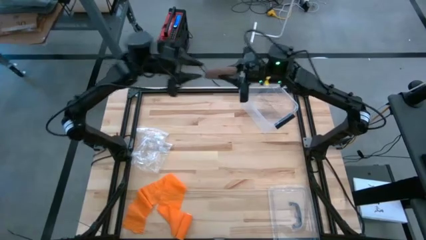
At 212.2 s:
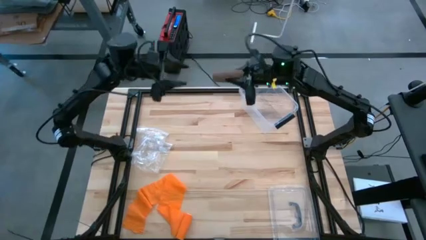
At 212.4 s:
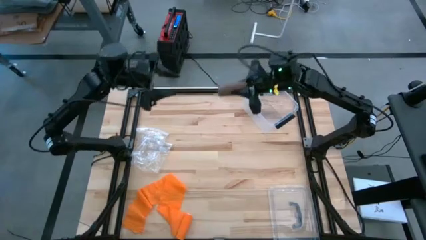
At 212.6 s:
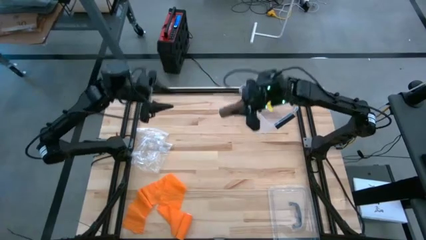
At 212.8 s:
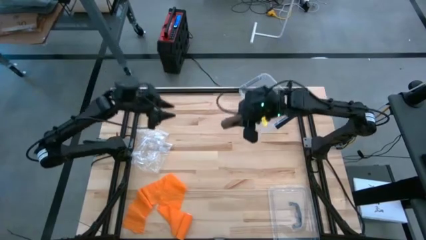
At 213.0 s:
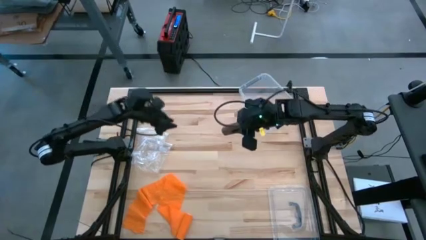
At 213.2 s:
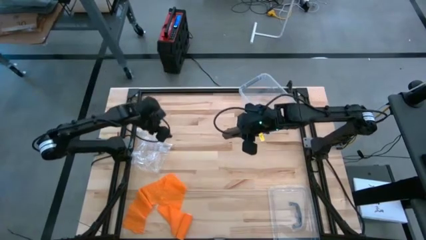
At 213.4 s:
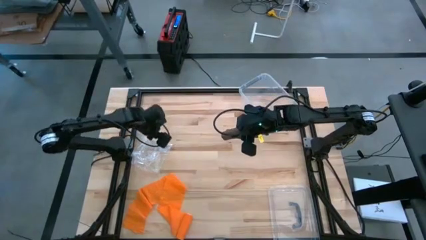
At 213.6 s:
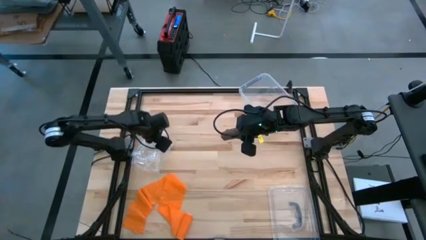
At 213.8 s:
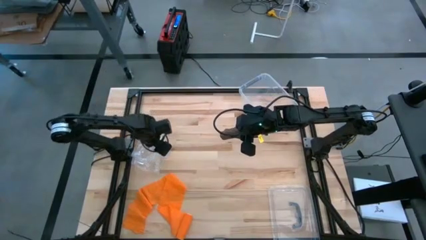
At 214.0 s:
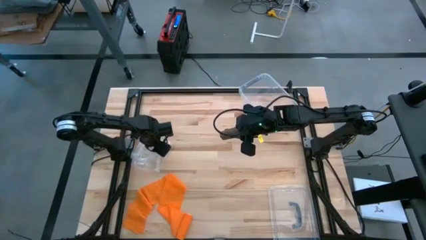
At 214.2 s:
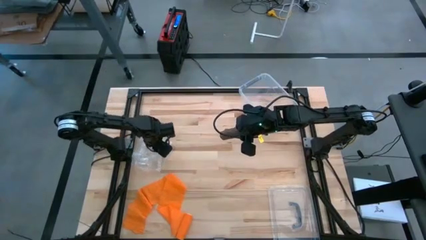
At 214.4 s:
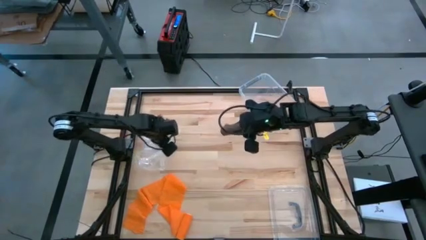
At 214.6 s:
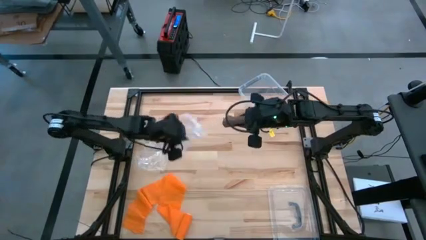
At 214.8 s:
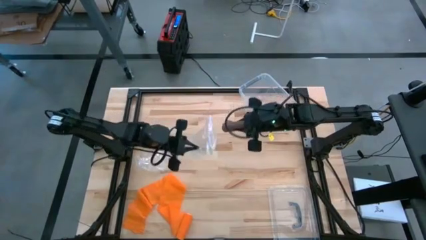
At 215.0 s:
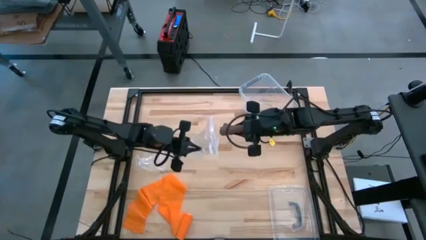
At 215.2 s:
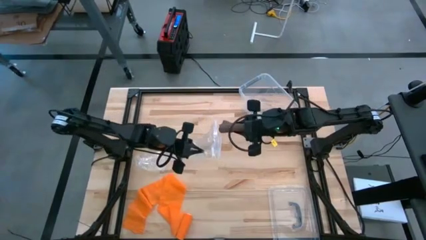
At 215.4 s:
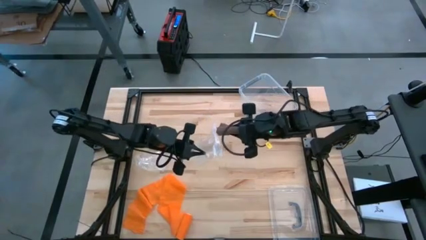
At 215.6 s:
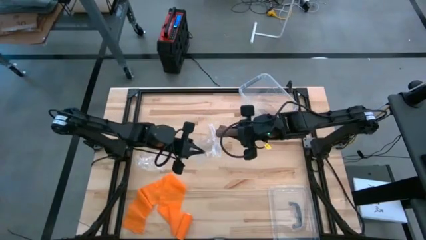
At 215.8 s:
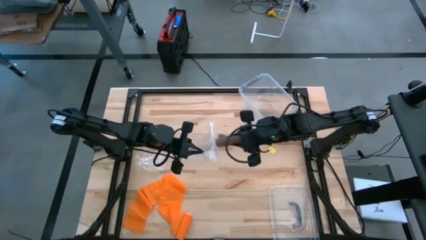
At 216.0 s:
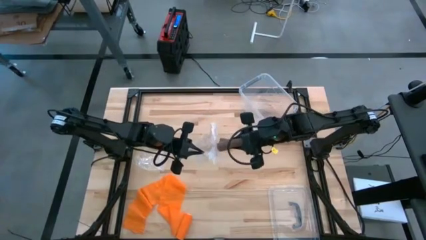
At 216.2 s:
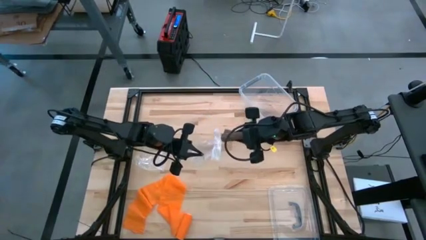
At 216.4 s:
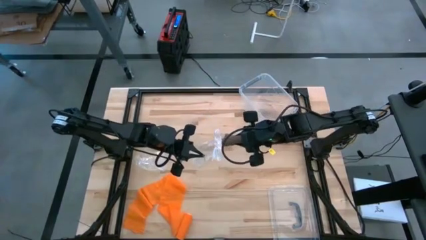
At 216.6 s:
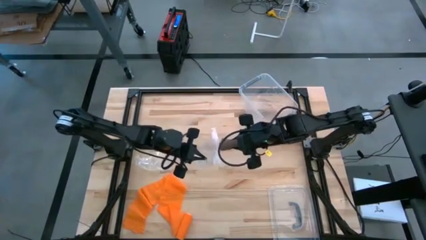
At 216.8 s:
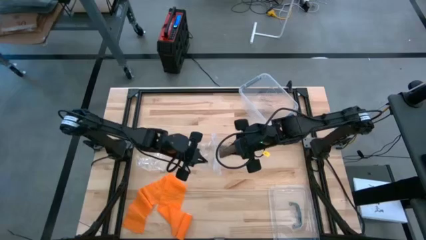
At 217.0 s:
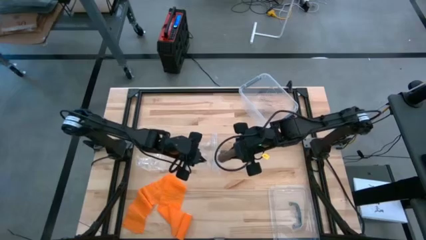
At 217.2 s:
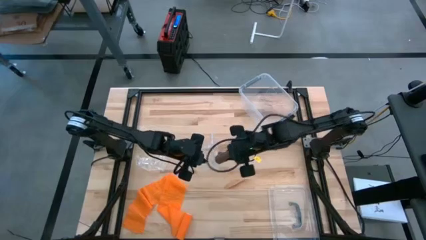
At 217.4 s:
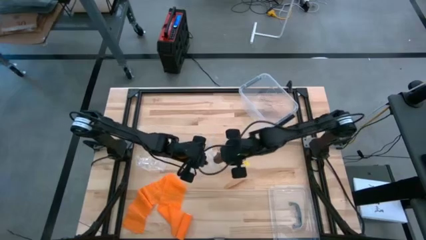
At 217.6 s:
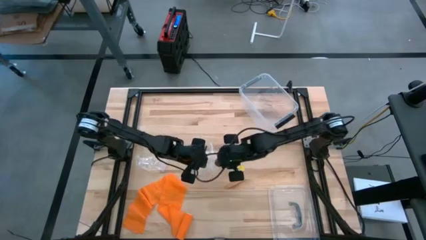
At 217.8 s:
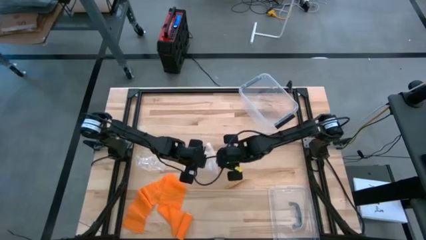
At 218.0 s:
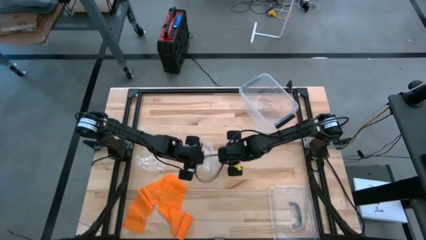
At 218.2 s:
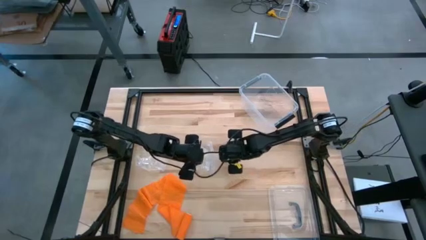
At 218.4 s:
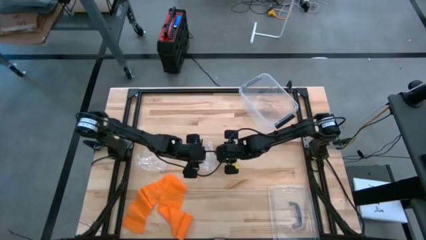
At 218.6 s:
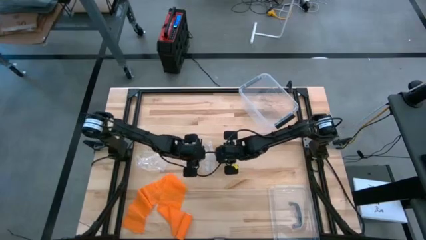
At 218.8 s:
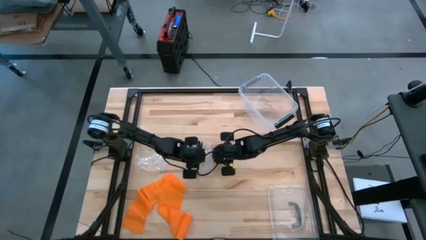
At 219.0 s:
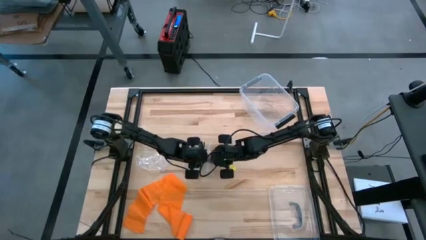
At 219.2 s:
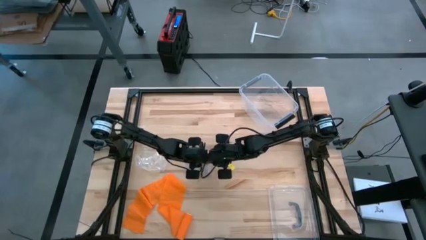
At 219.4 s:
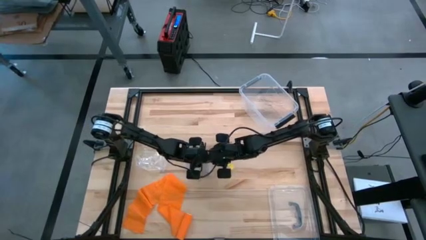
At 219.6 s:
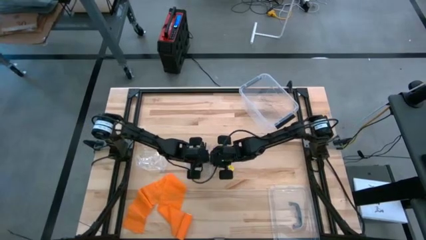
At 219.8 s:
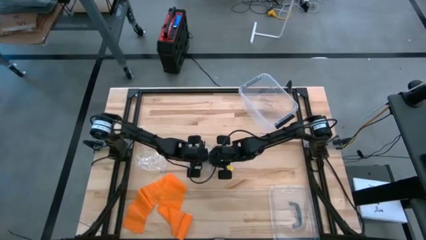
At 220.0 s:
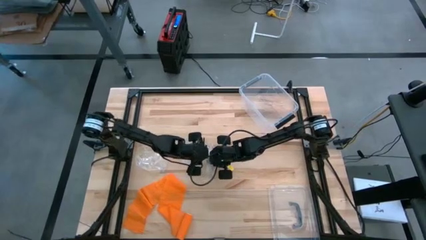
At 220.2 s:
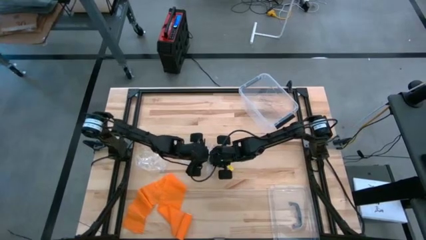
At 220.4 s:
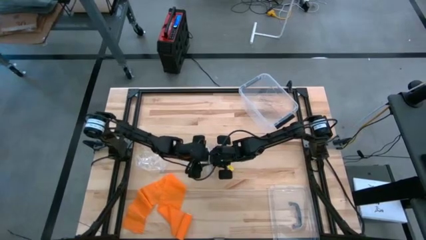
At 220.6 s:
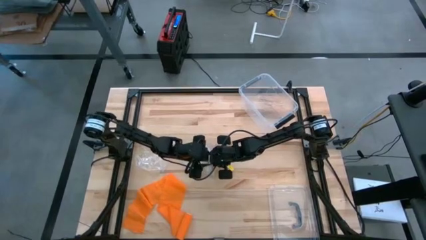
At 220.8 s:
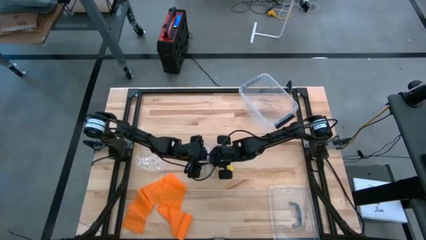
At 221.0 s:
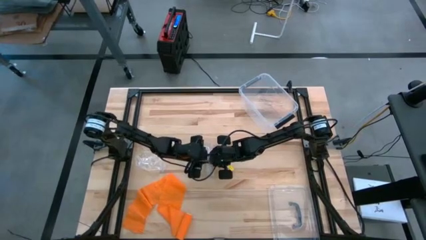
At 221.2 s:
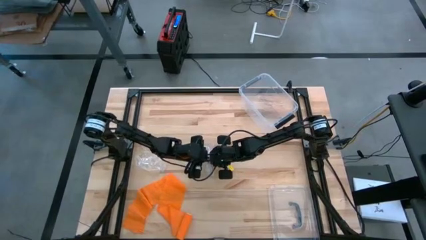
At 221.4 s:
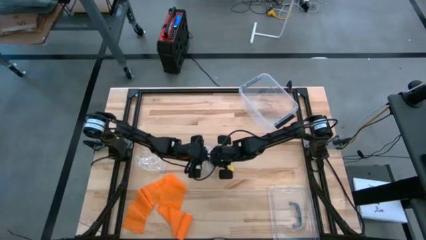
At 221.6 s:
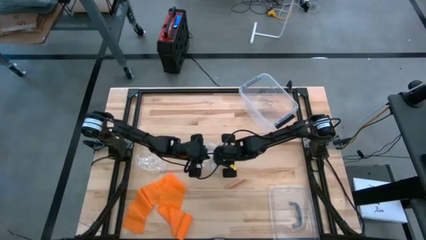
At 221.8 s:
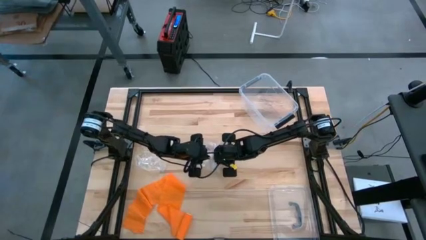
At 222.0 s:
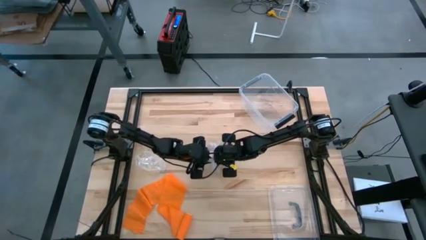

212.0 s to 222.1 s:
Task: Roll bandage
Put the brown bandage into the zip bag

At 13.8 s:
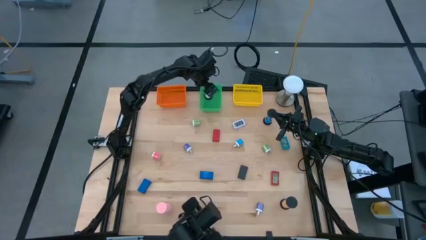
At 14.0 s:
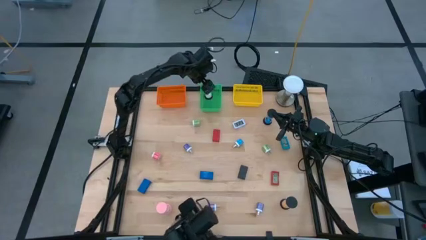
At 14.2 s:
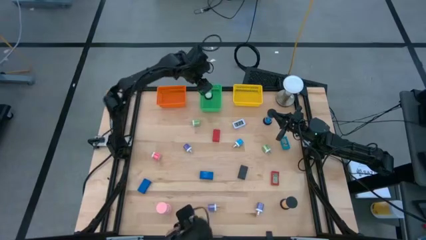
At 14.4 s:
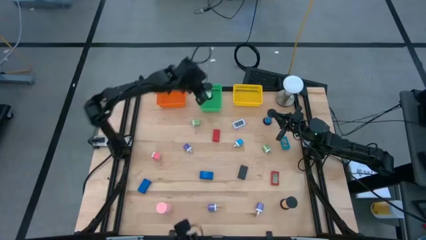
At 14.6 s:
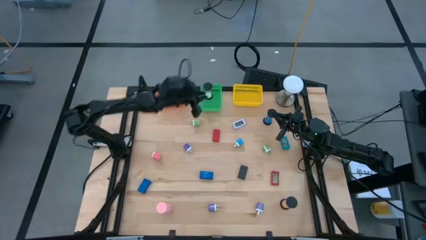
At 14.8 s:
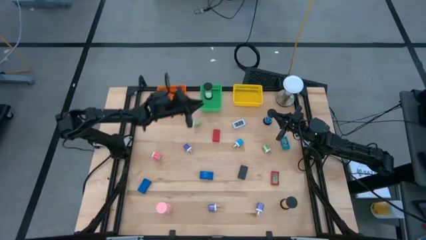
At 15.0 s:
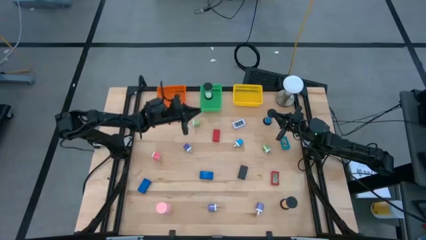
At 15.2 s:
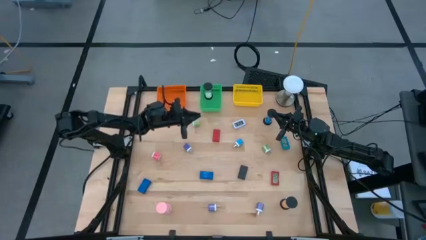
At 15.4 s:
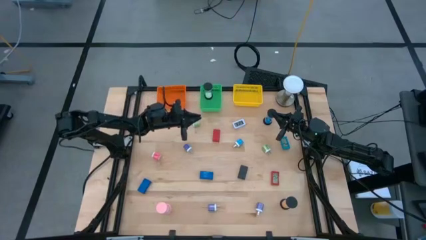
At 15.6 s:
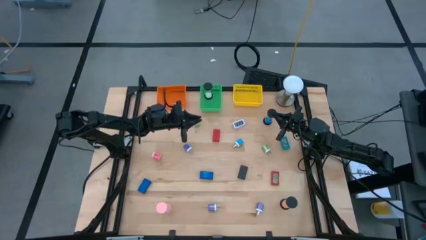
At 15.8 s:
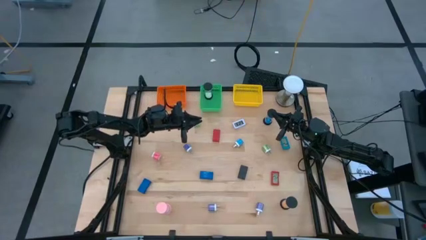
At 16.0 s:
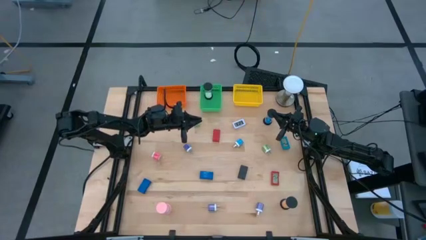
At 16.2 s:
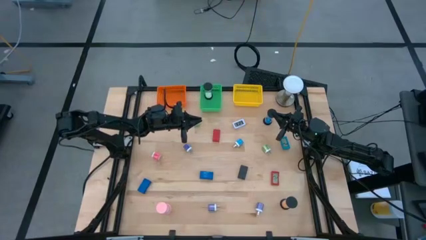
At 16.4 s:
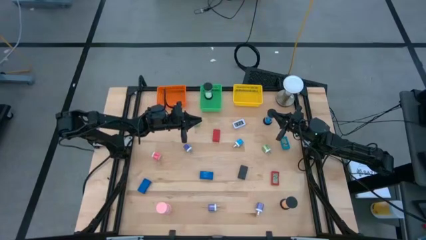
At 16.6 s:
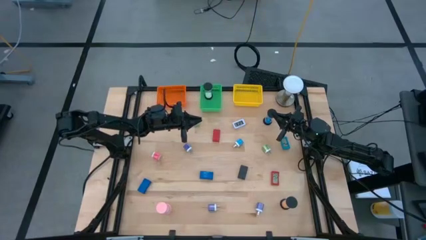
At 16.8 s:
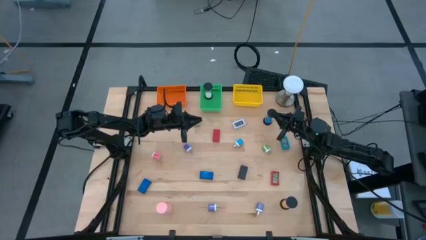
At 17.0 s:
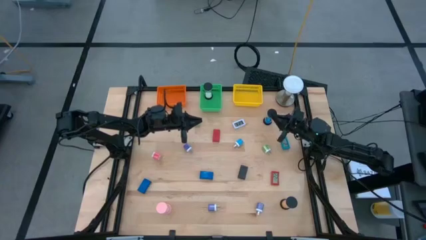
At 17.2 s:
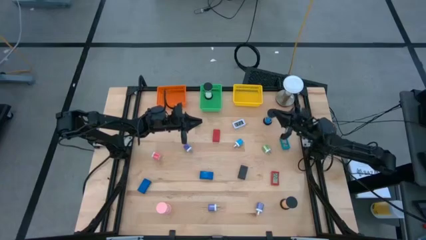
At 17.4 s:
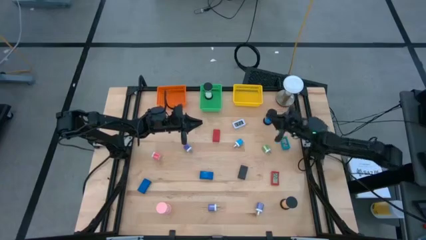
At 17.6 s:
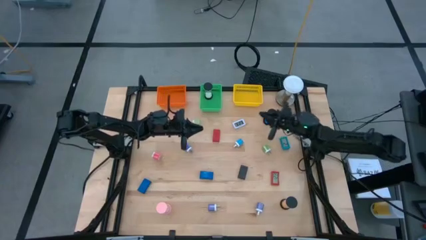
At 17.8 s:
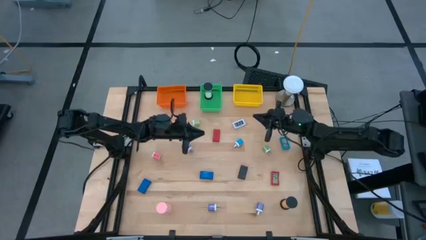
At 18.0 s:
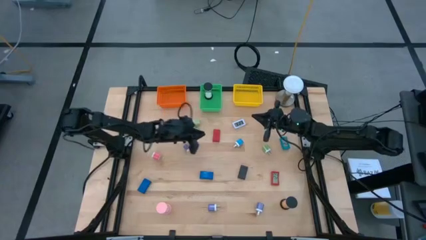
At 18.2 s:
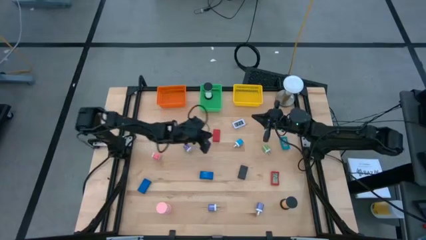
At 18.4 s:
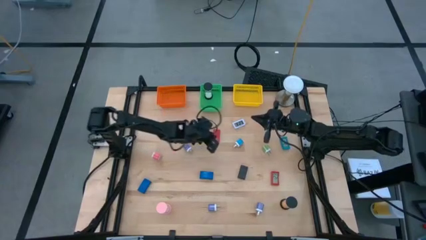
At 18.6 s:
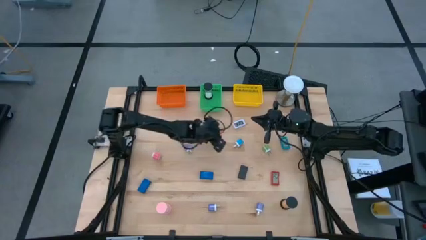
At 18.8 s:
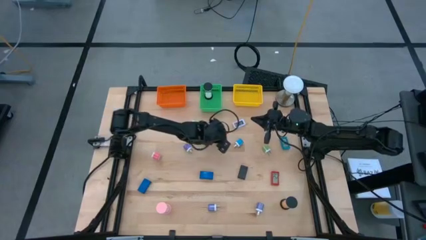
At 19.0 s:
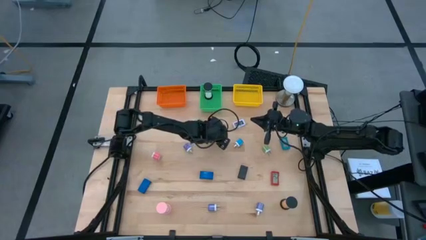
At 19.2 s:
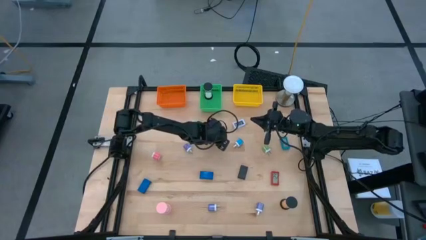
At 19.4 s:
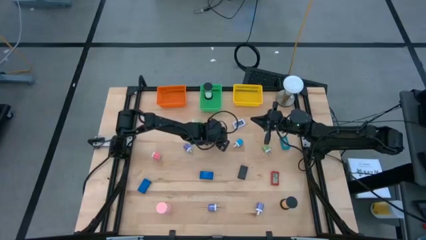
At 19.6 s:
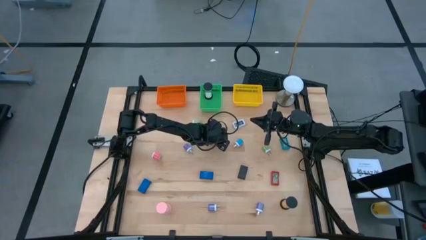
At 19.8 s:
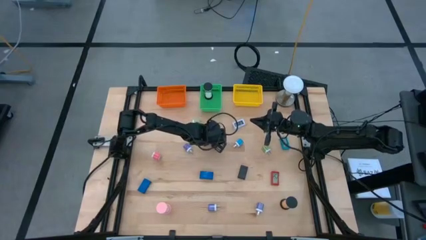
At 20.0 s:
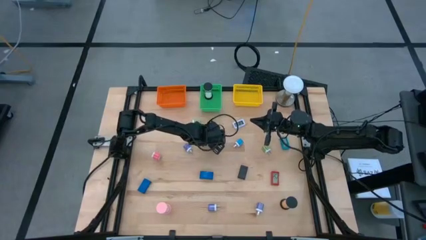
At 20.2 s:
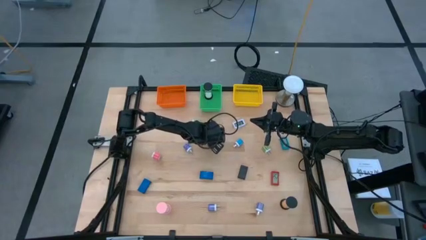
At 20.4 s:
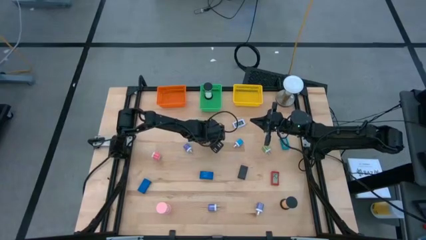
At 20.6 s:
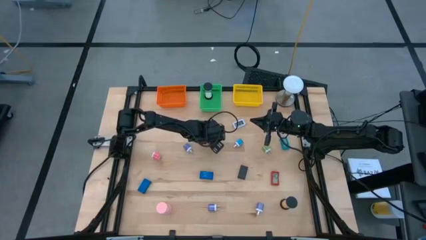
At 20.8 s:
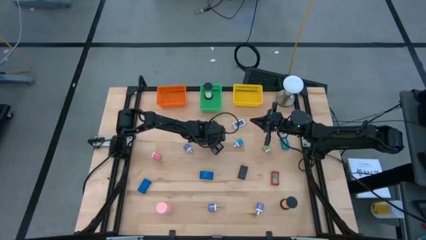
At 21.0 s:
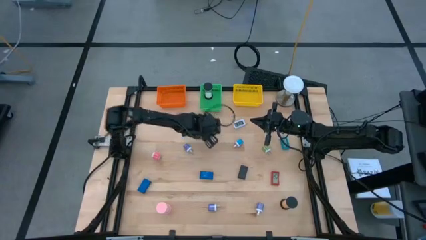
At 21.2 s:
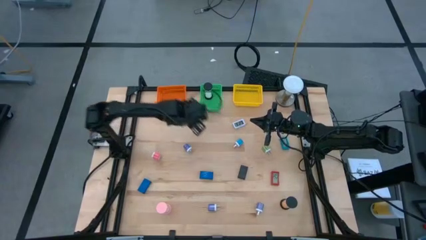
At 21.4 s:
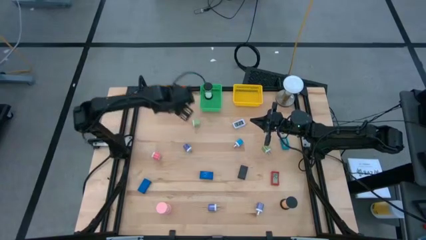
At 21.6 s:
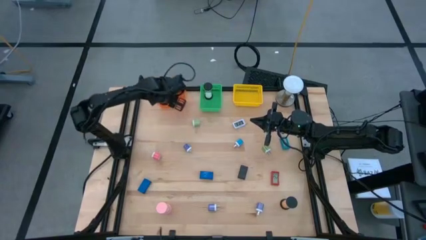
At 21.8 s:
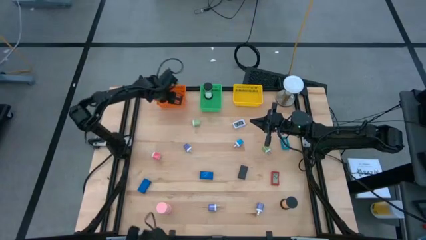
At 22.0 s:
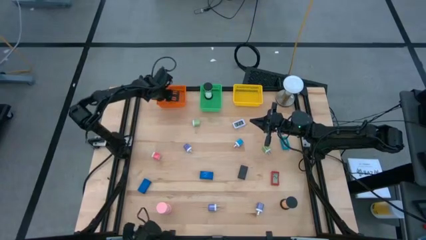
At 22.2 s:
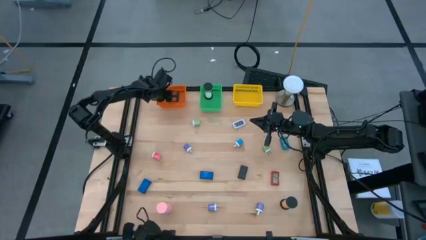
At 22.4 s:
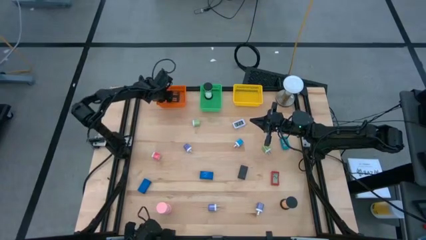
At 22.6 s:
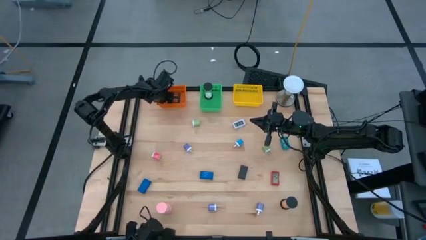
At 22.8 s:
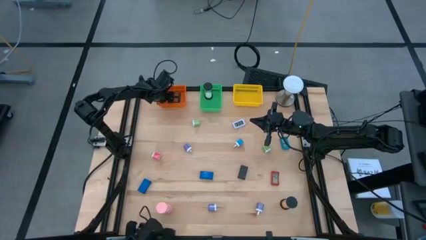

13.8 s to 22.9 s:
Task: Pick & Place Office items
Put the top red digital clock into the orange bin
